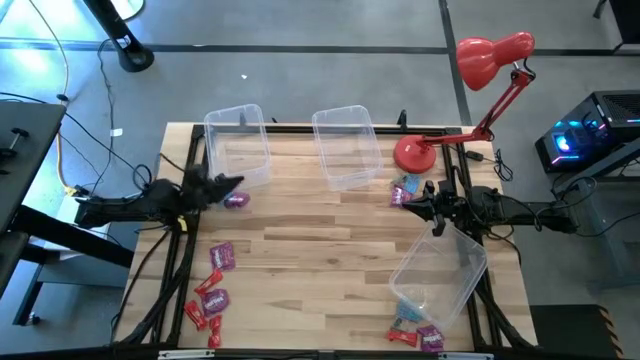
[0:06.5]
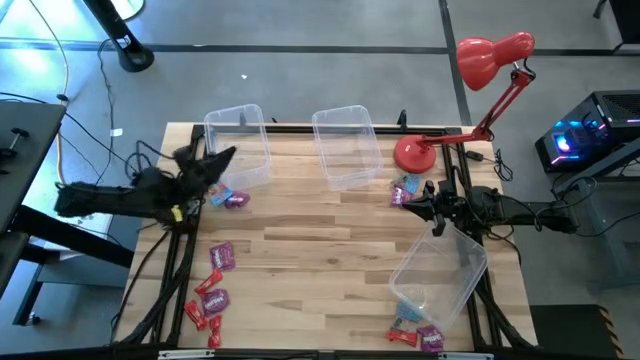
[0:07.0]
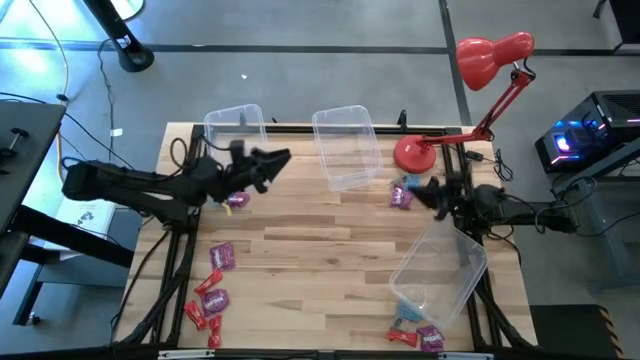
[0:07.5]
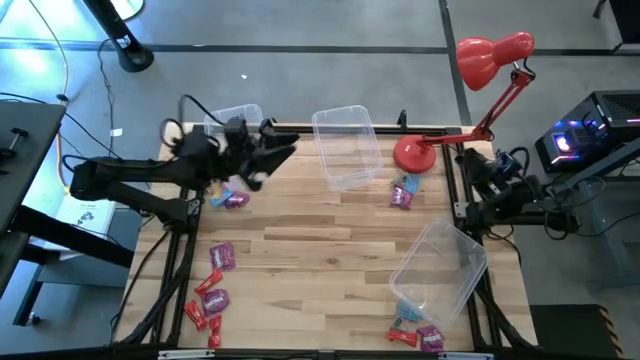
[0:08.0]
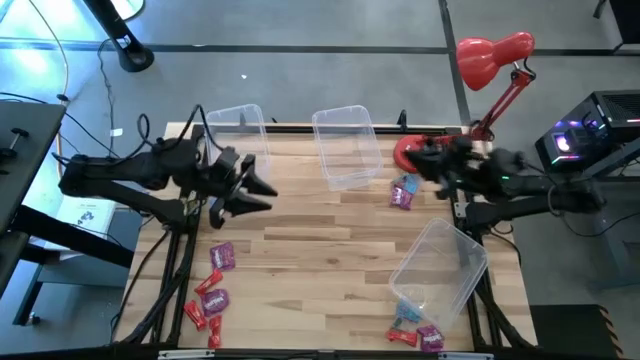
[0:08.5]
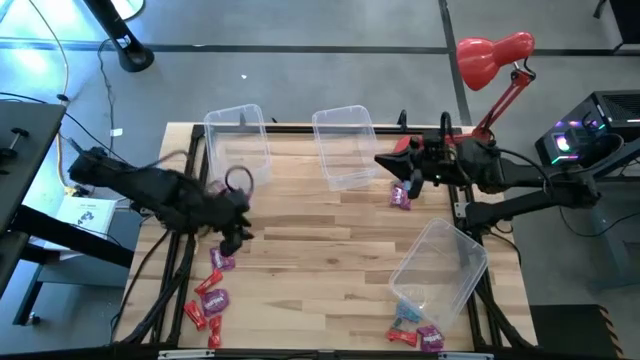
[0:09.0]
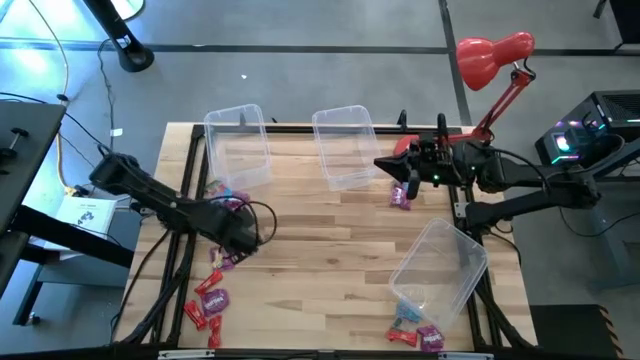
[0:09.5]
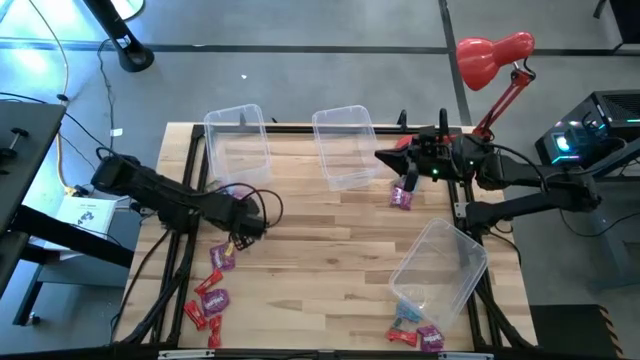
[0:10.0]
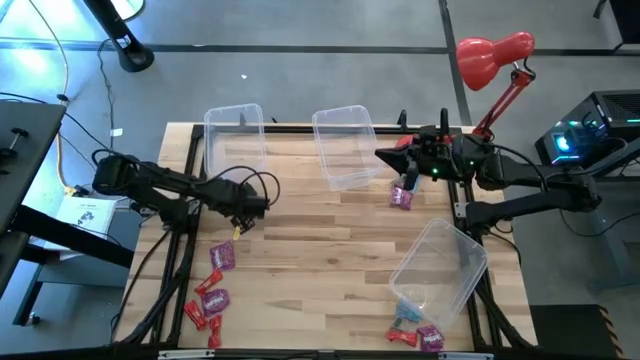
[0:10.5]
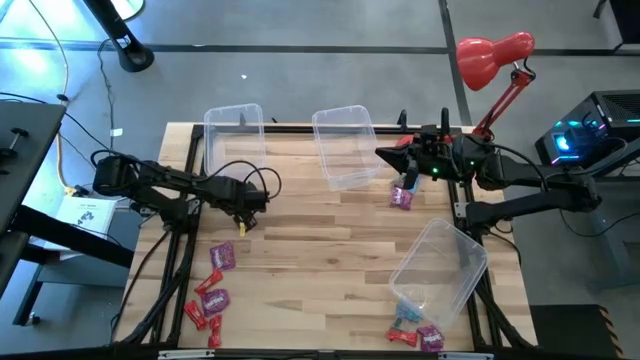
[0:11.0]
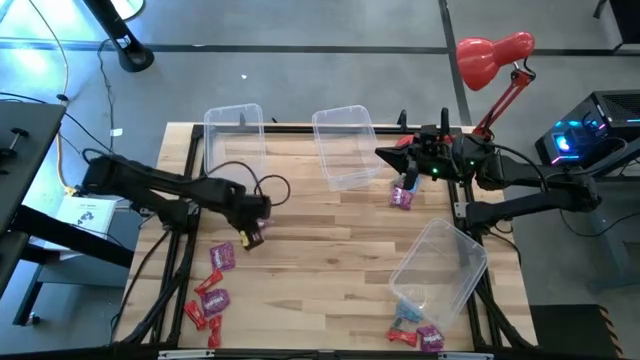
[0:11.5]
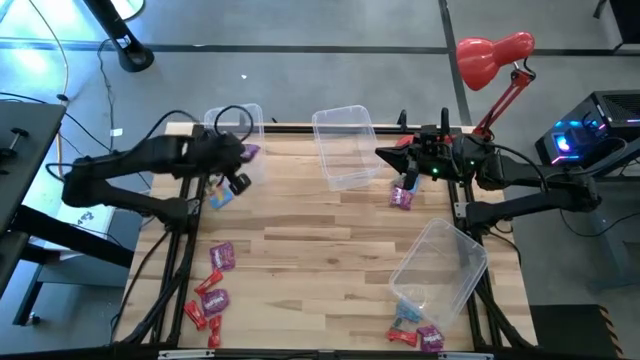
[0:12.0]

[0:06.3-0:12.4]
Task: Sort candy
Put the purple candy into the top left transparent bin

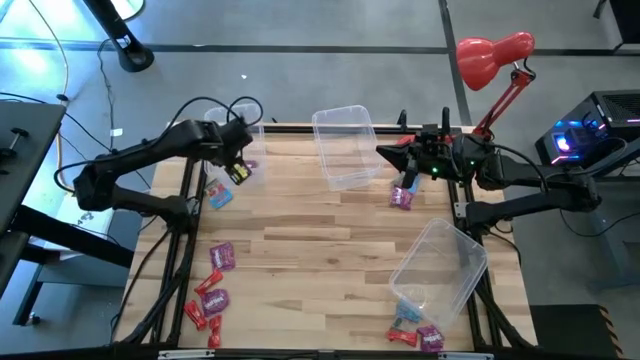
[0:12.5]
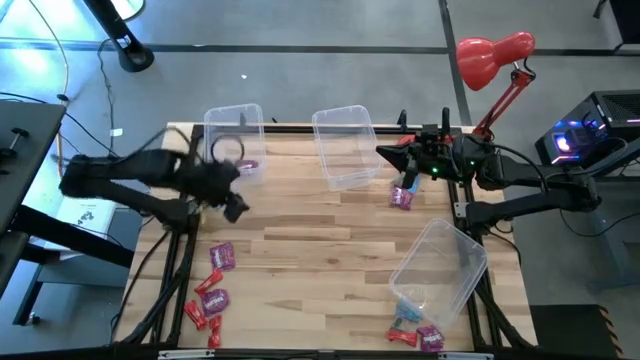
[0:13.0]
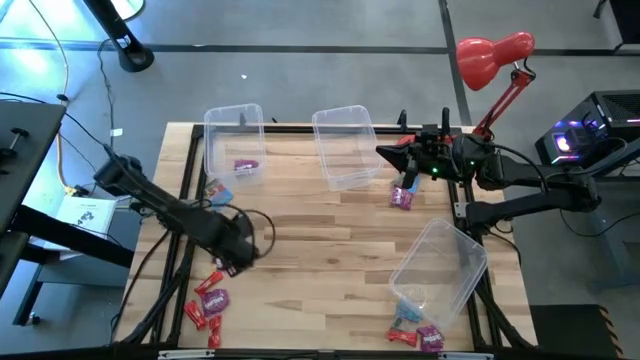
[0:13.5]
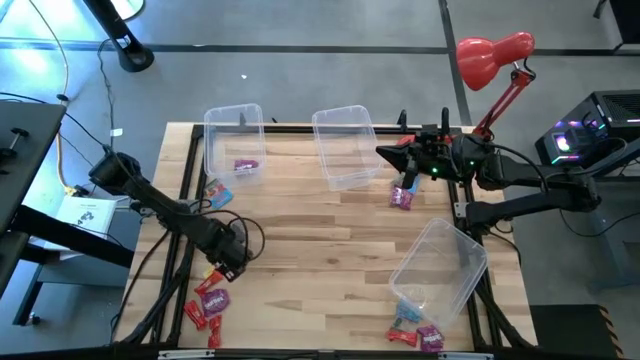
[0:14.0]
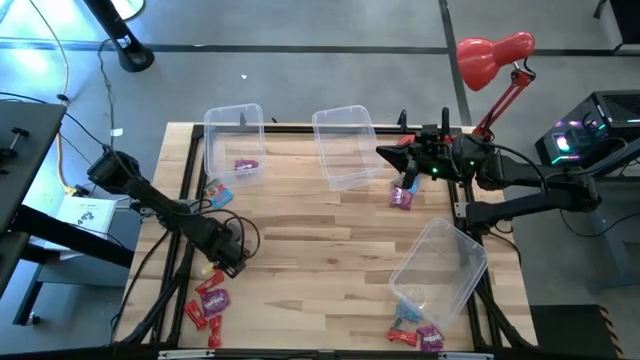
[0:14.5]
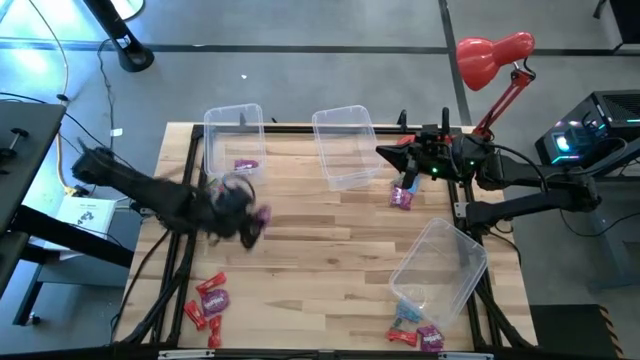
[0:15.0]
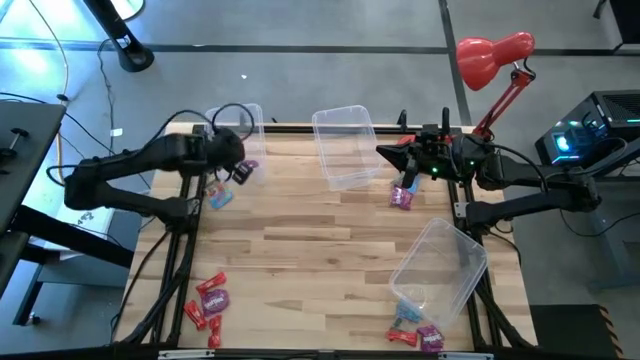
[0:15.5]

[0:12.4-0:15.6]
Put the purple candy into the top left transparent bin

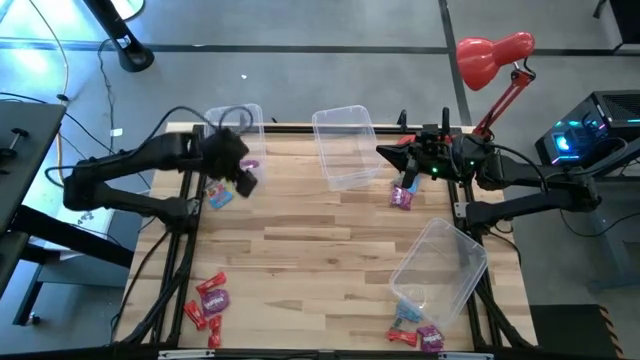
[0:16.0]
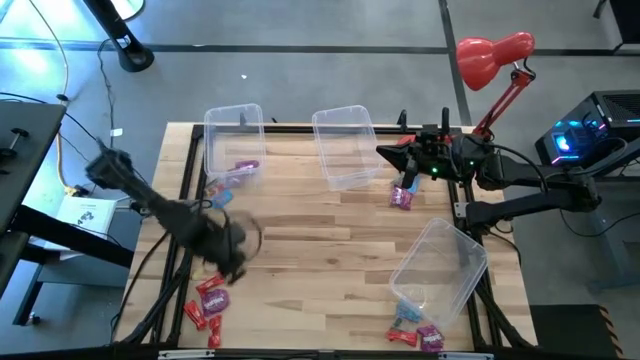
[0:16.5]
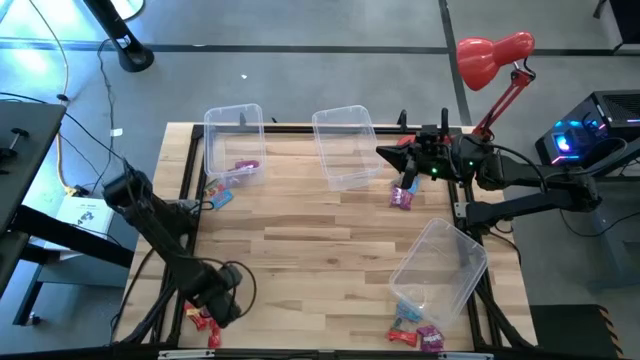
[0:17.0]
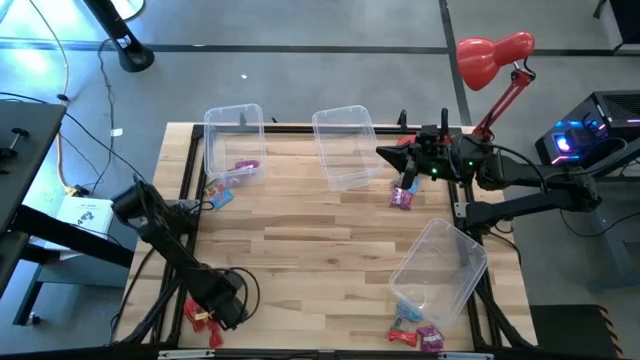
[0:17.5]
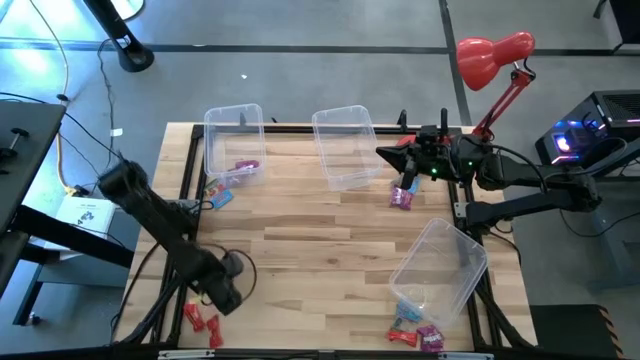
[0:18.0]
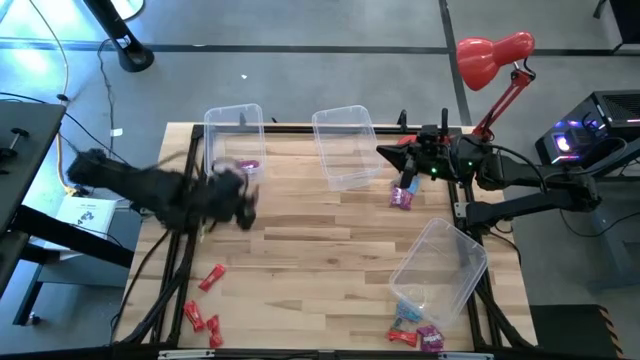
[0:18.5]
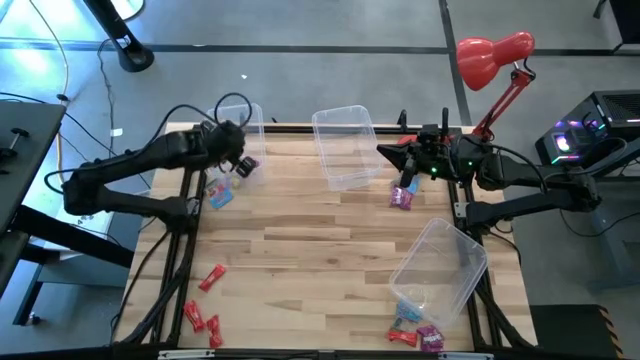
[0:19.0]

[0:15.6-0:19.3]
Put the purple candy into the top left transparent bin

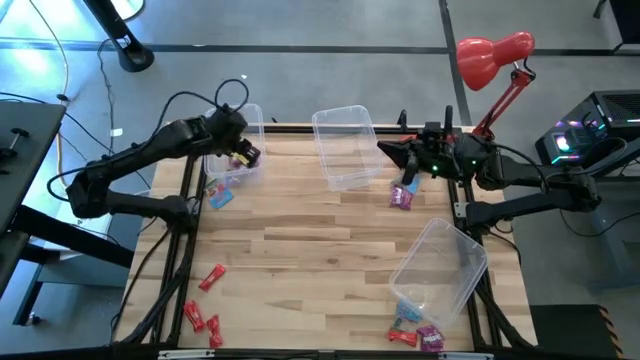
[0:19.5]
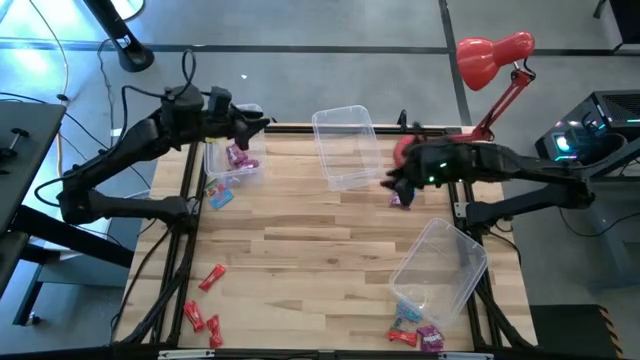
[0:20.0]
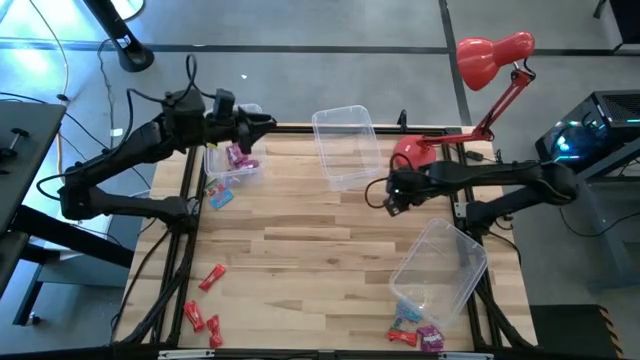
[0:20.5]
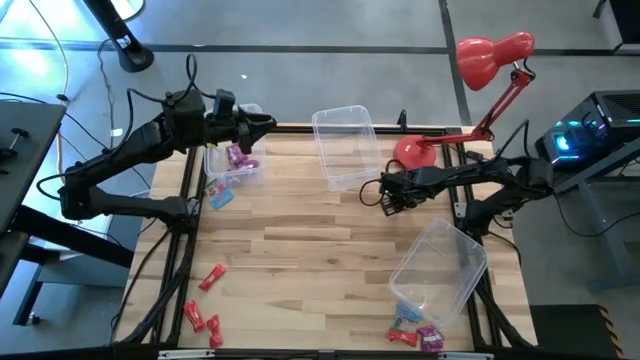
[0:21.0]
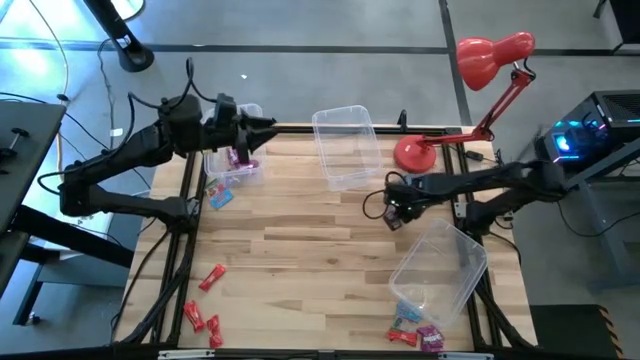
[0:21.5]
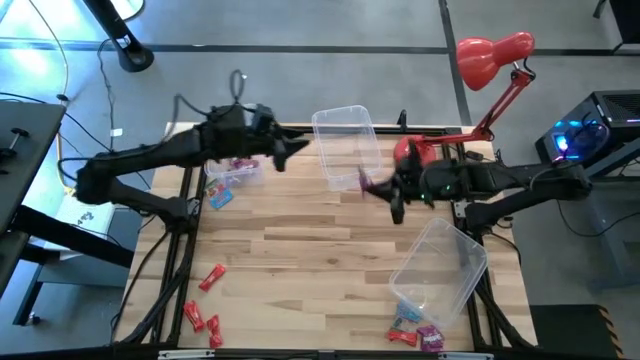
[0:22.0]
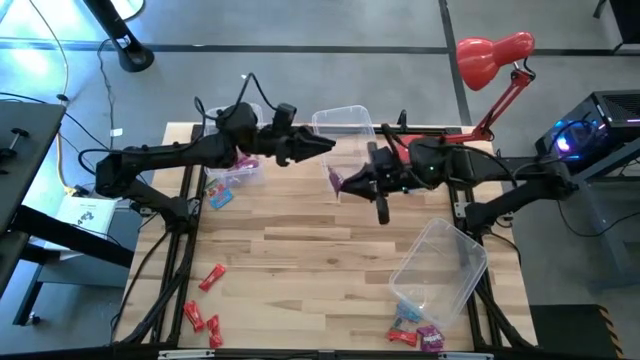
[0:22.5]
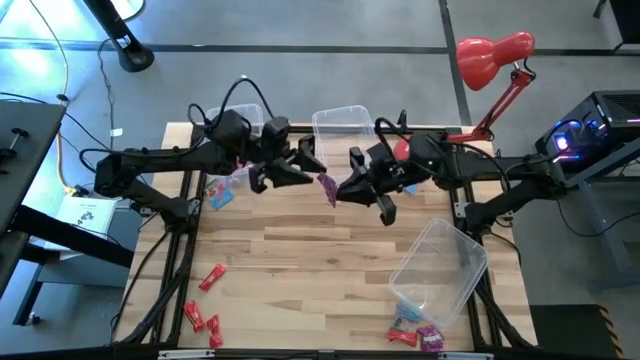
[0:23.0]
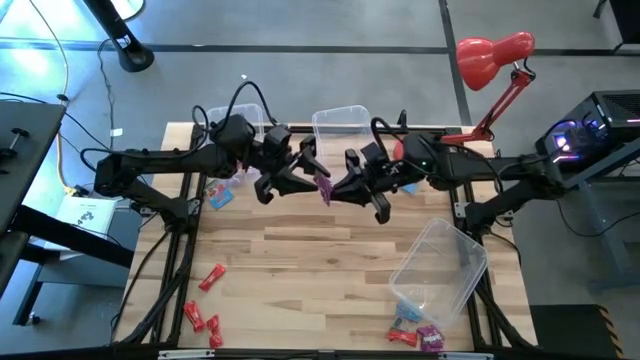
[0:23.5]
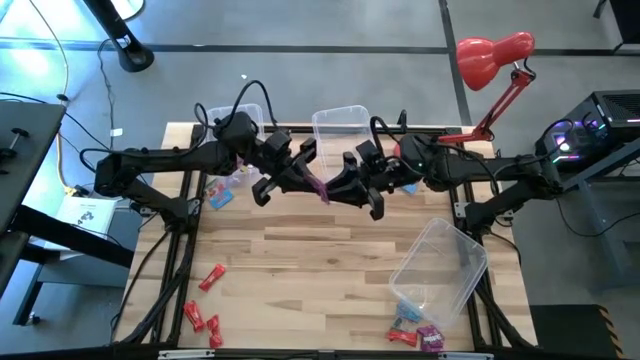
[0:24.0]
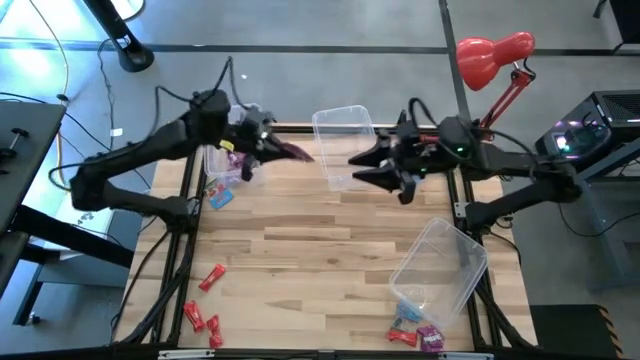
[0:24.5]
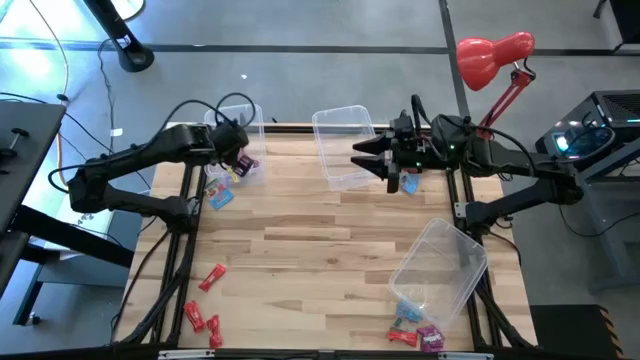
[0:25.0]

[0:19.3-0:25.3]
Put the purple candy into the top left transparent bin

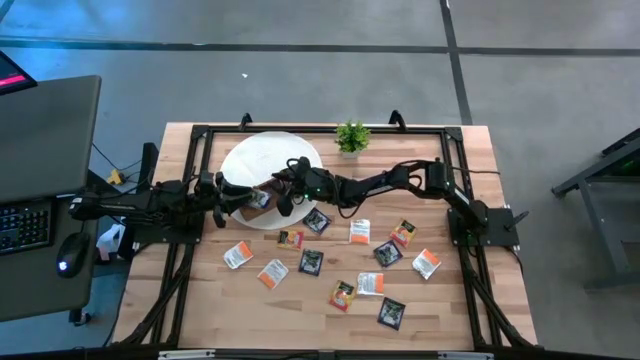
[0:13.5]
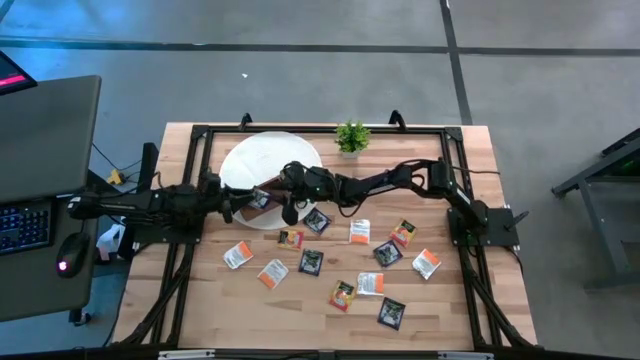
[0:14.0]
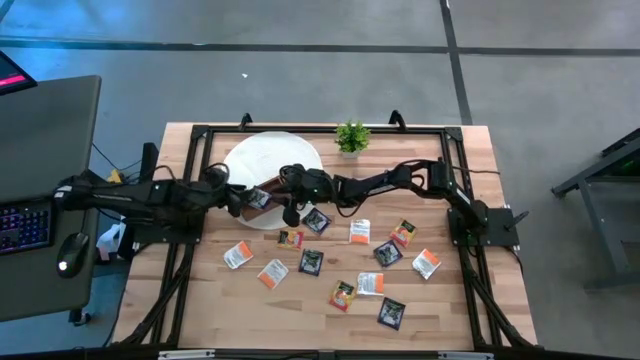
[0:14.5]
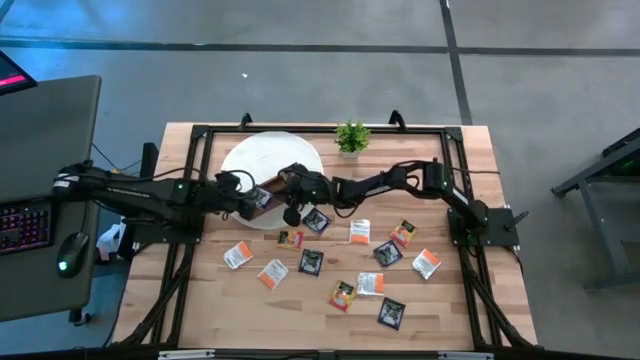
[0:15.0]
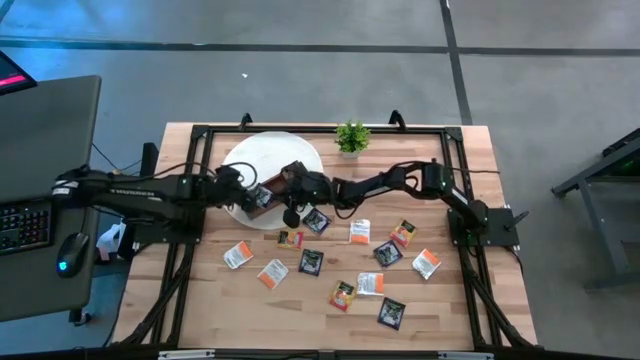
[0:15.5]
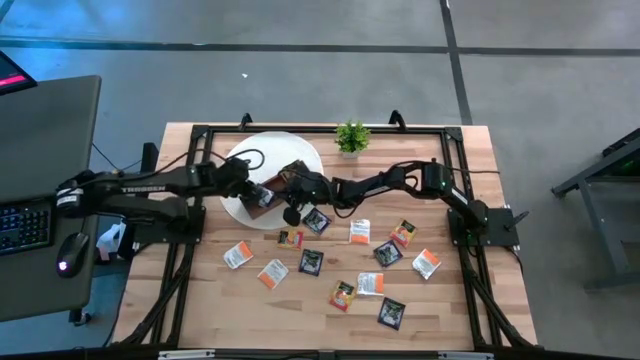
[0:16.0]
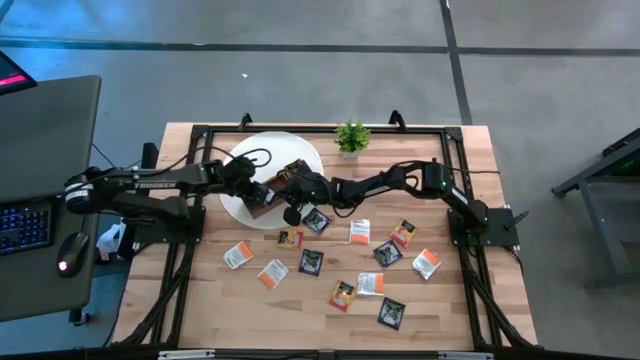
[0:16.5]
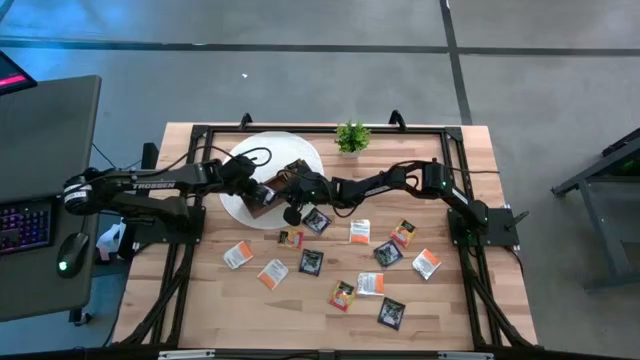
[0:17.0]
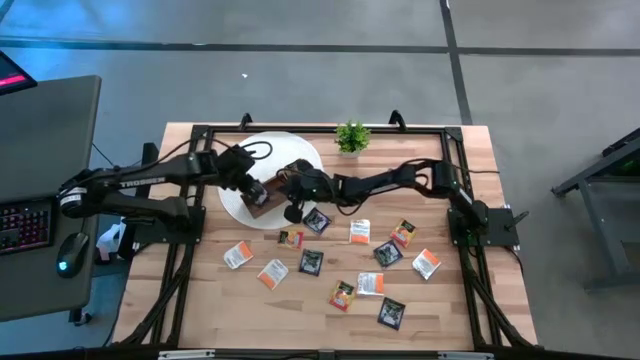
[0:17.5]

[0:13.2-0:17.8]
Task: Pick & Place Tea
Put the purple tea bag into the left section of the wooden organizer
